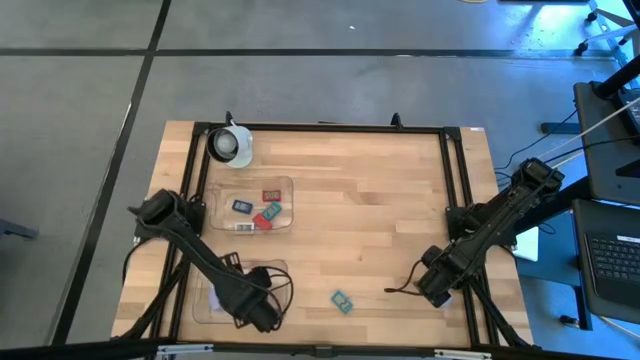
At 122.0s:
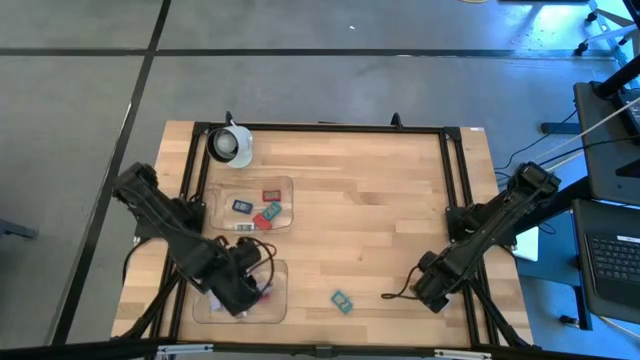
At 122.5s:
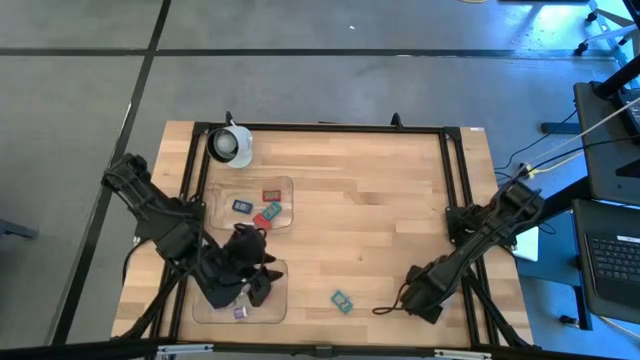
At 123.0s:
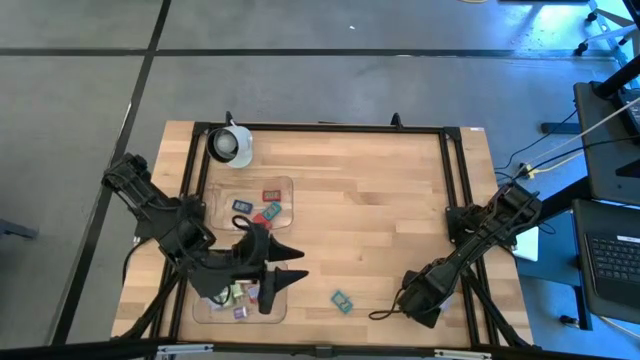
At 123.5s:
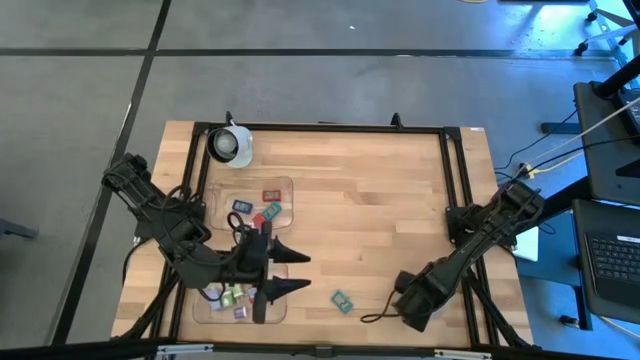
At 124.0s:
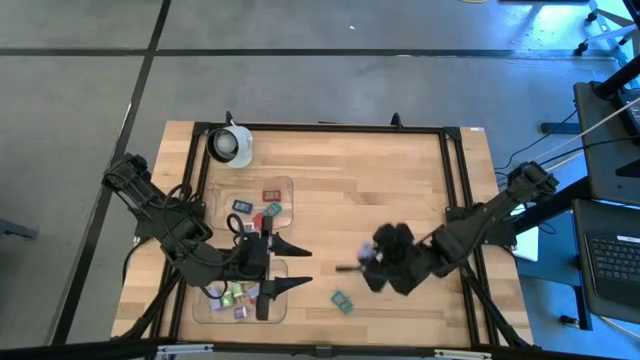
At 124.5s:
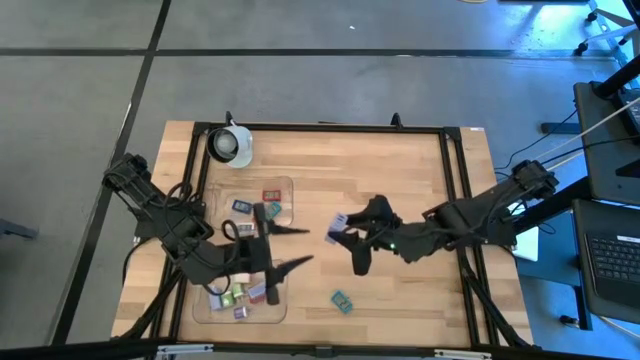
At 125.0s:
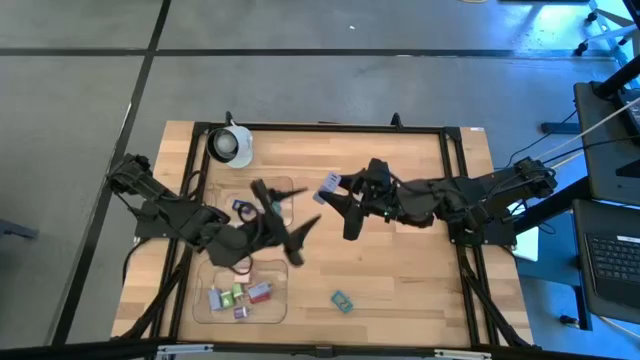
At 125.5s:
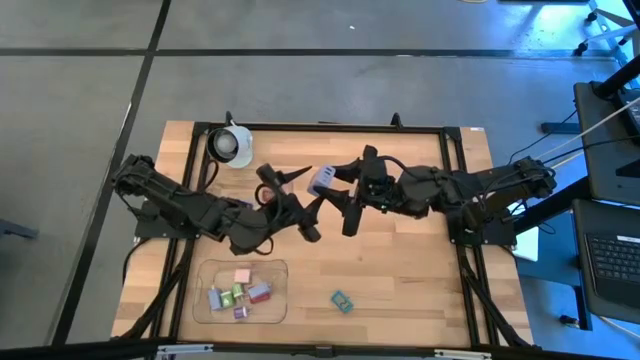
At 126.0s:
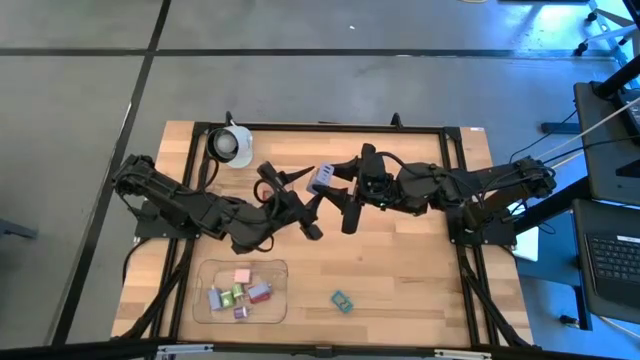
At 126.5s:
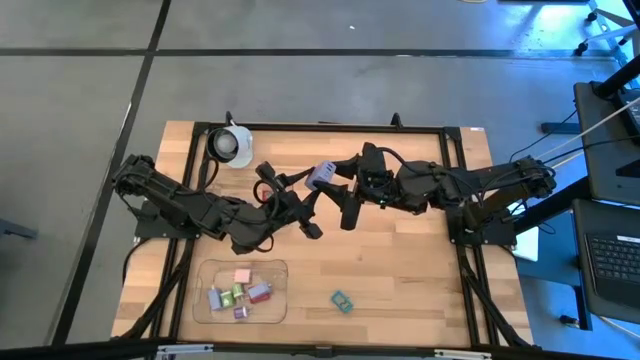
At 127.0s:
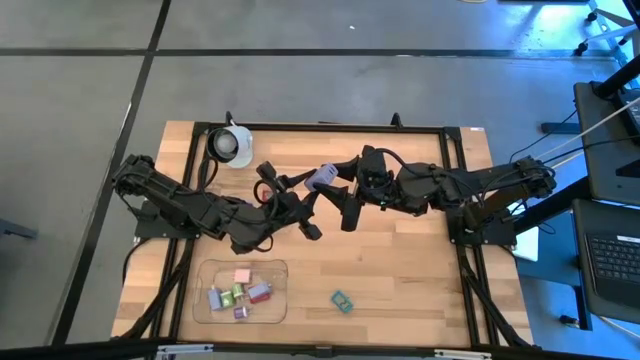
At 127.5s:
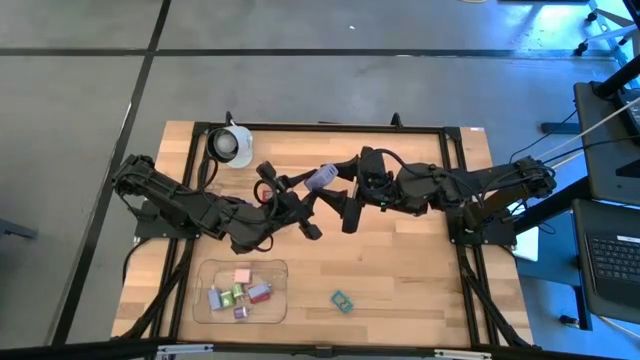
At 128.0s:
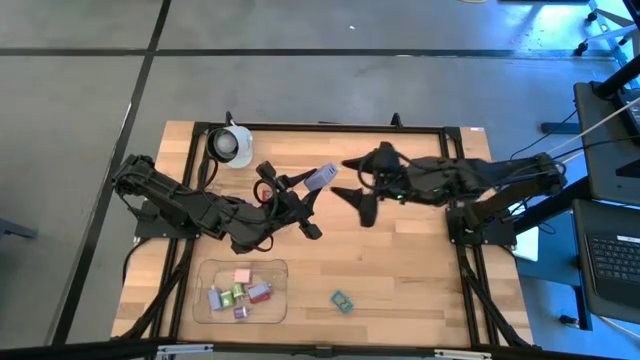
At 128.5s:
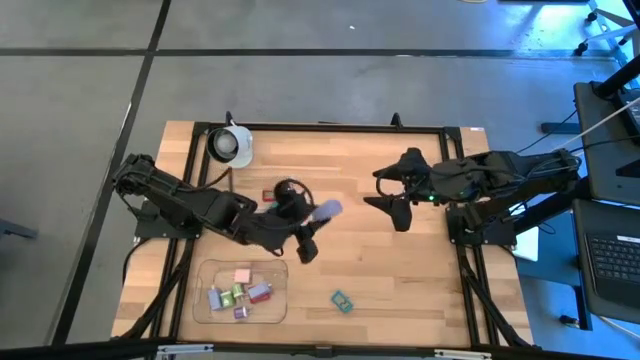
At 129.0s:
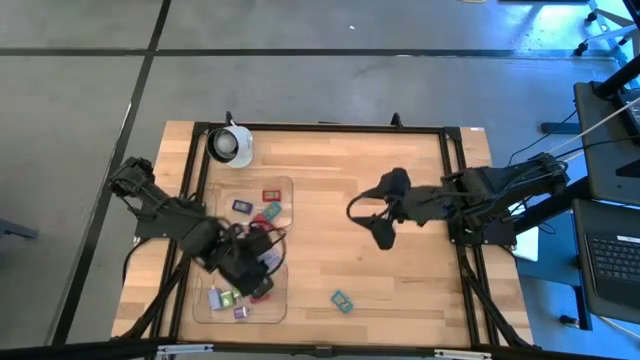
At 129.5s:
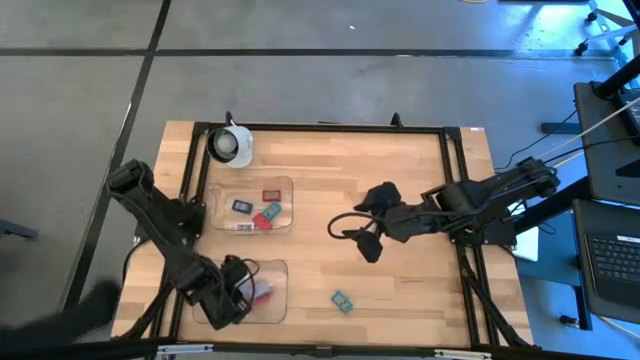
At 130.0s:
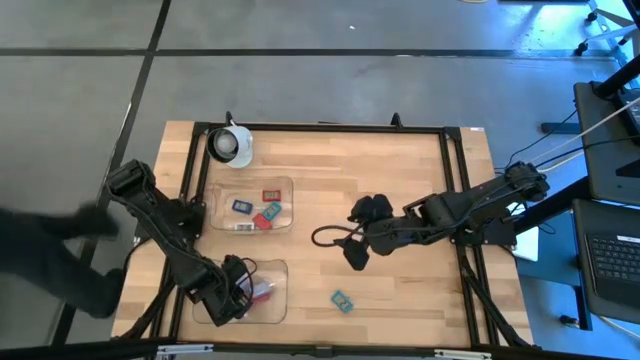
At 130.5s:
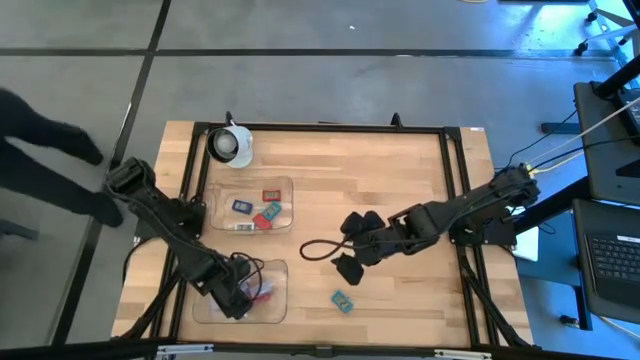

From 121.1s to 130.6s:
Task: Pick & Place Office items
Put the light blue charger adapter into the bottom transparent bin

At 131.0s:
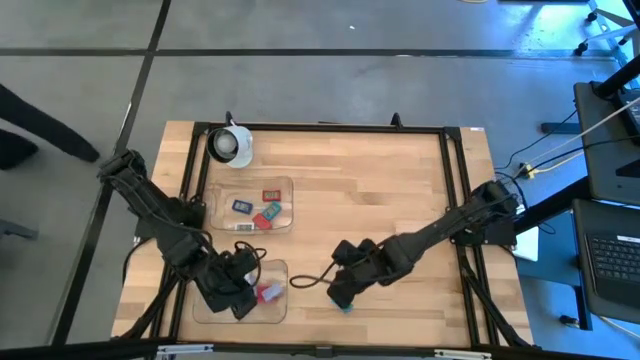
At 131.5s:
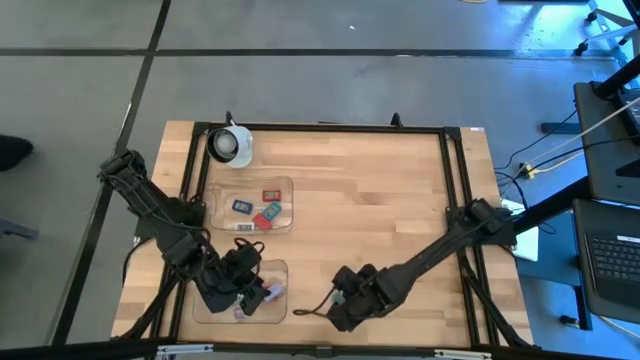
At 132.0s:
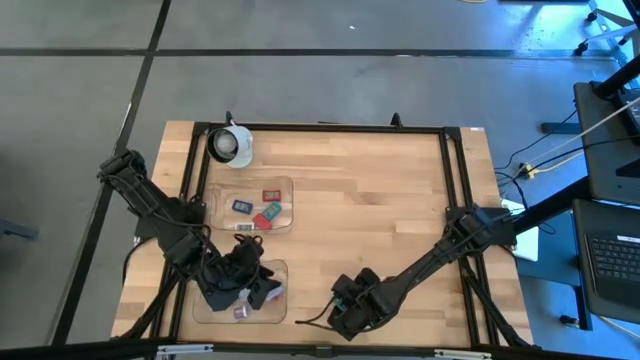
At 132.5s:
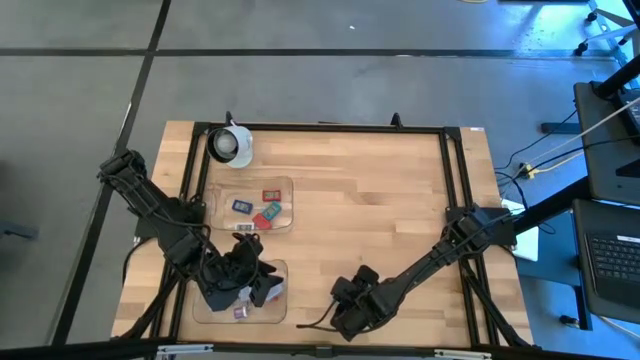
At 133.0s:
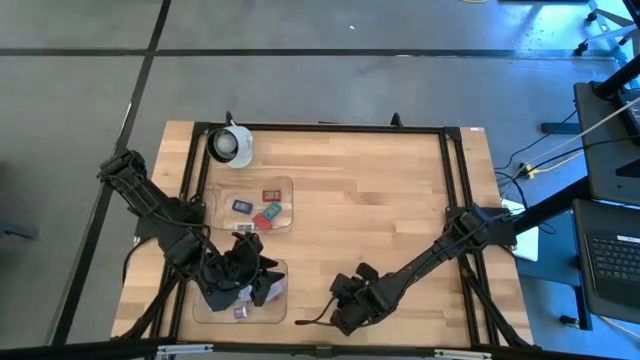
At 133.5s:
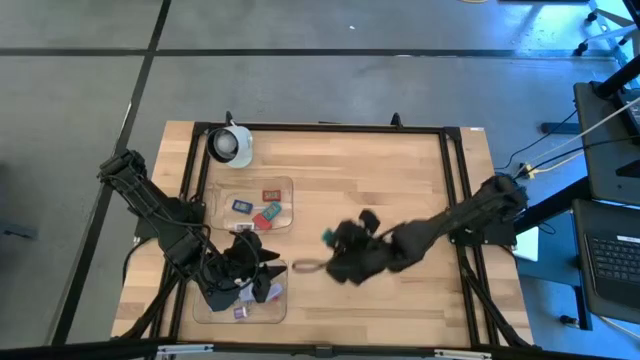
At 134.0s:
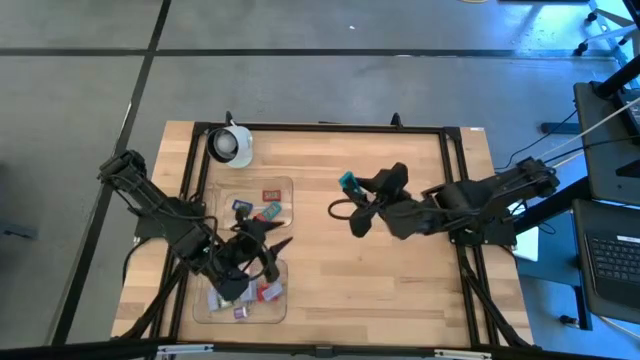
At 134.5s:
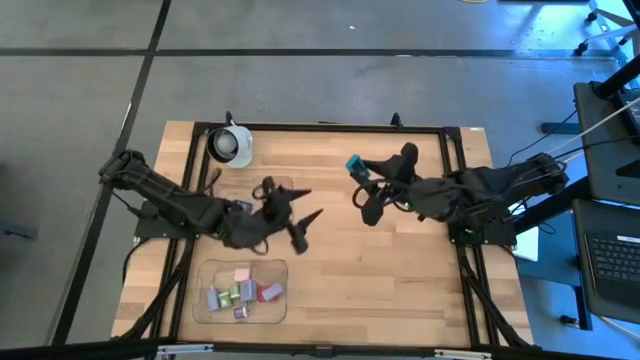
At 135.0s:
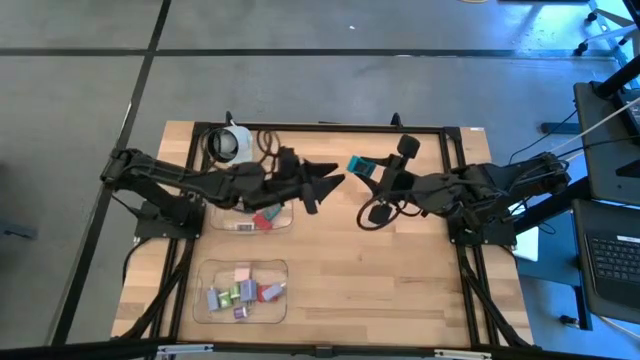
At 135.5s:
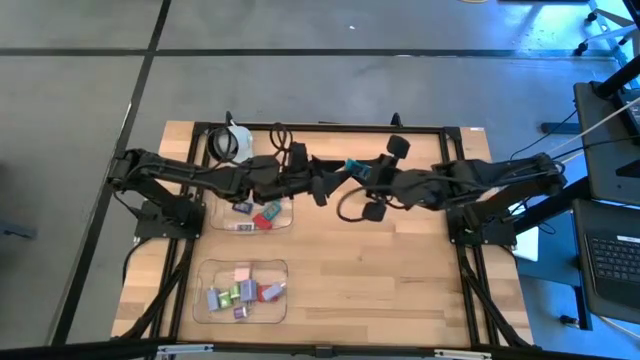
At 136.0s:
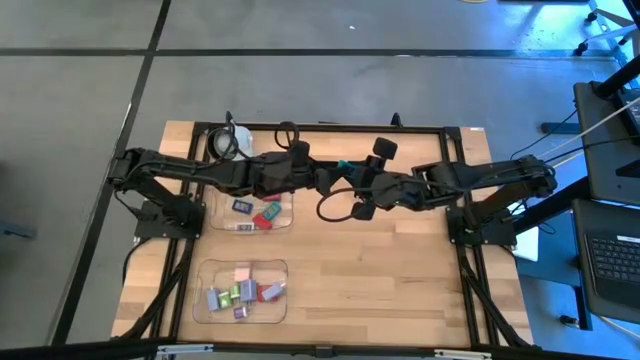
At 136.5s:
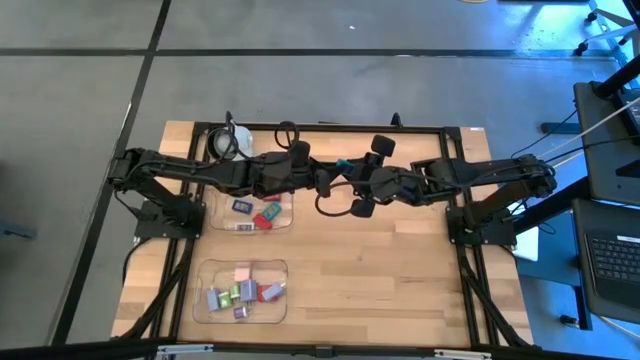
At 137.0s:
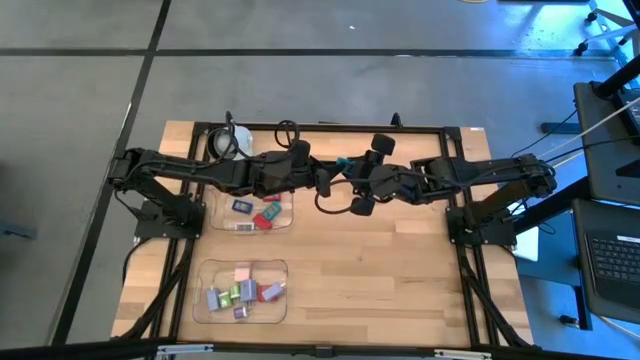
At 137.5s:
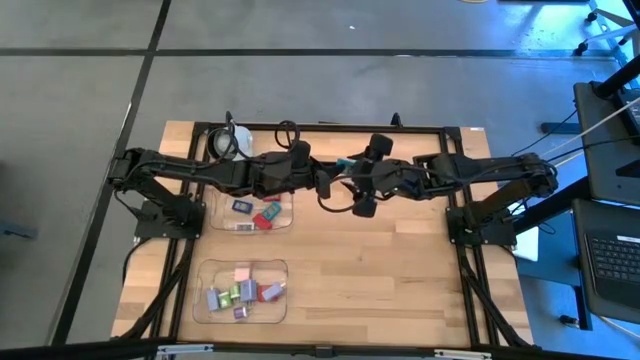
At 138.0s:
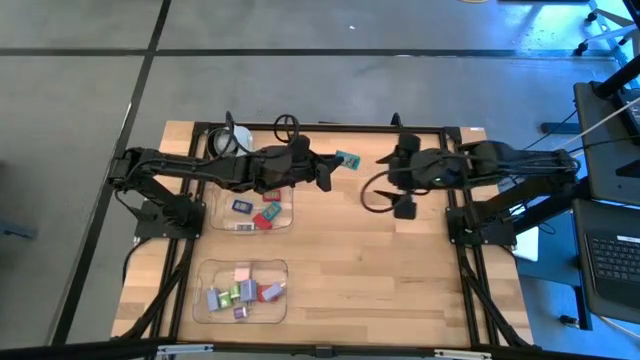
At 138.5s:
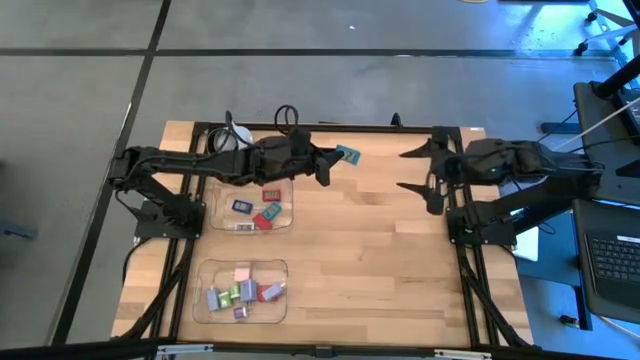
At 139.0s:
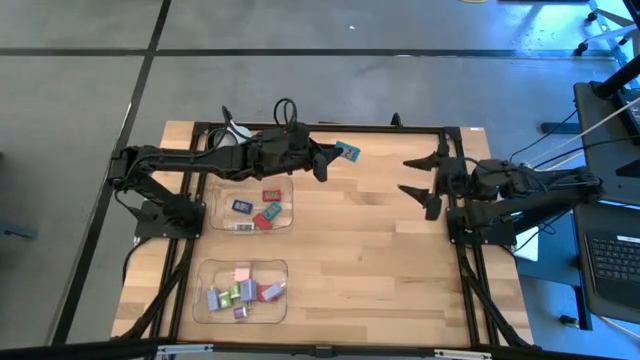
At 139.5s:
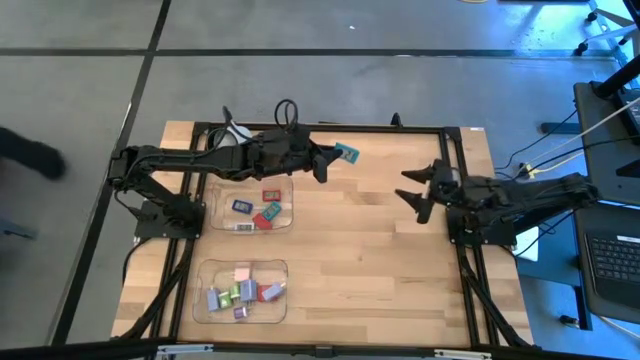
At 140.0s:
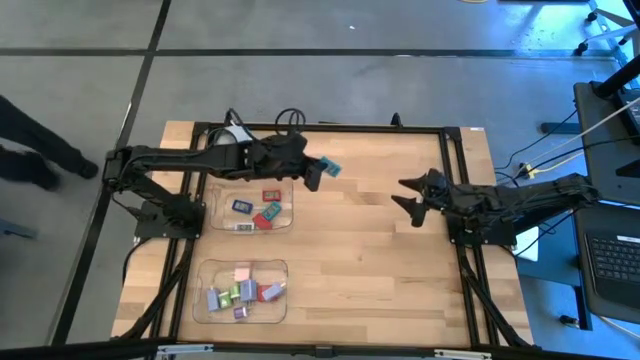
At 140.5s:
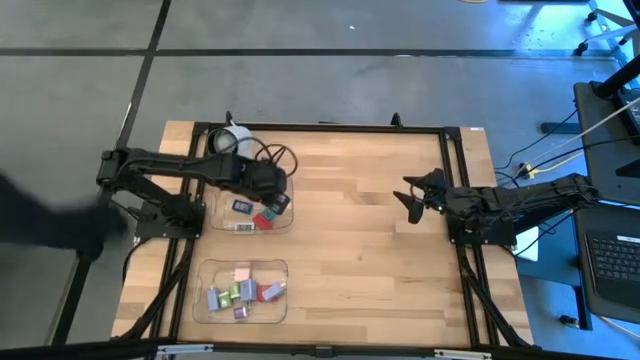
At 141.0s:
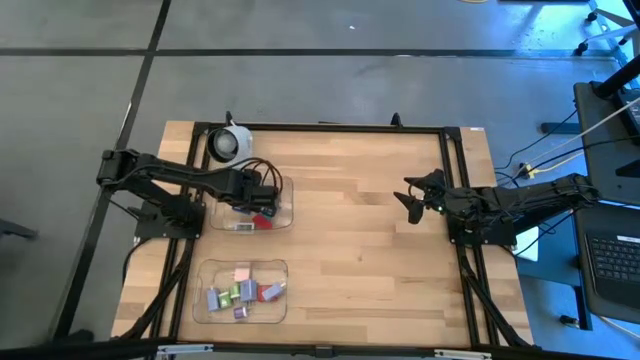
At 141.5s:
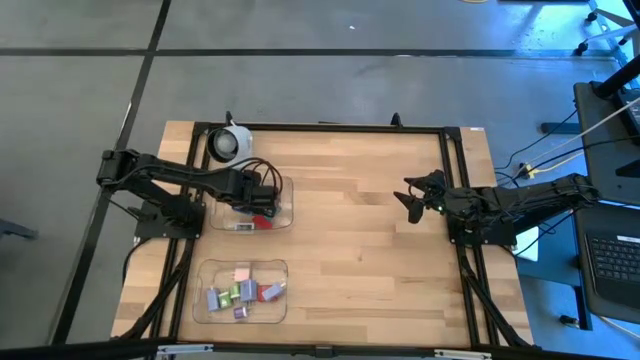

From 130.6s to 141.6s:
Put the light blue timer into the top transparent bin

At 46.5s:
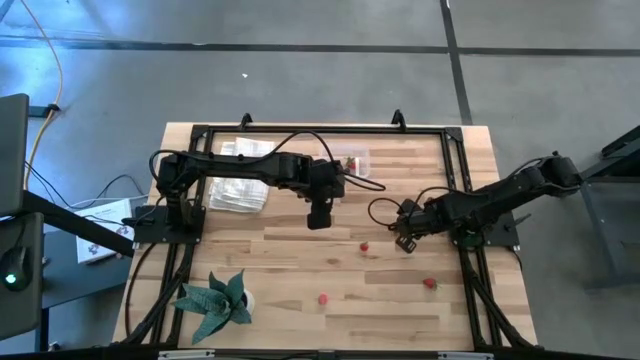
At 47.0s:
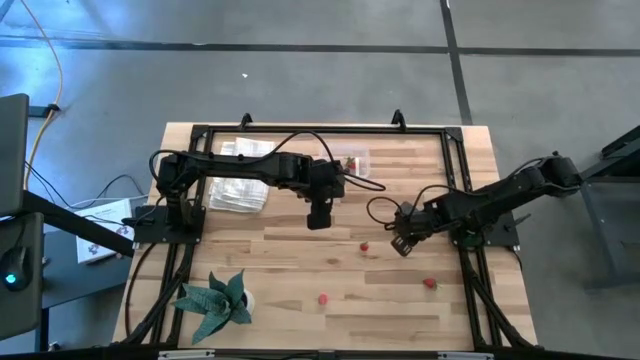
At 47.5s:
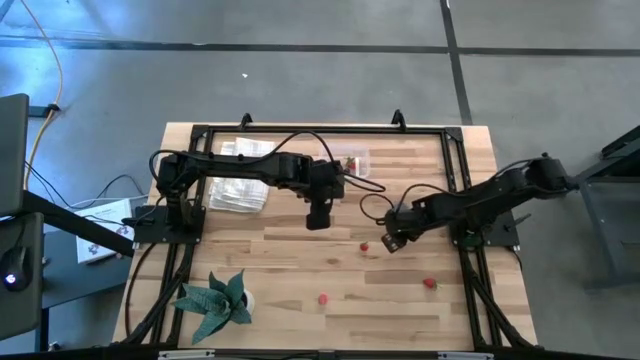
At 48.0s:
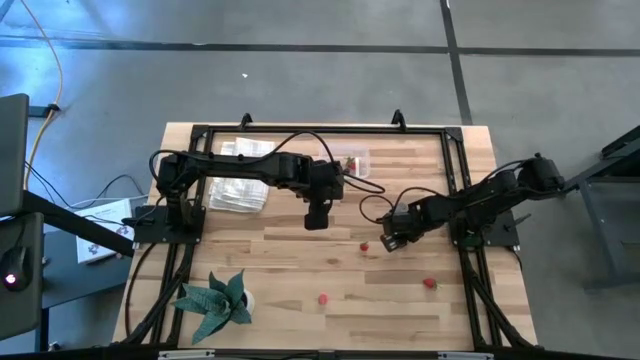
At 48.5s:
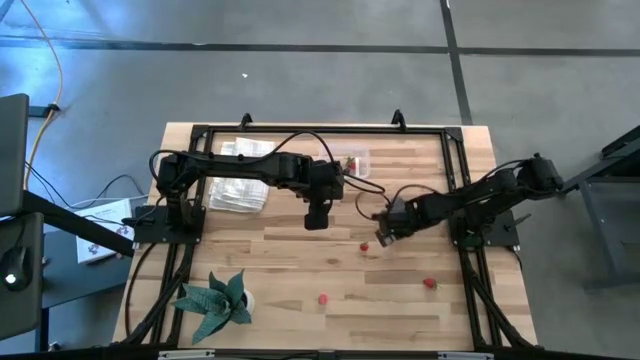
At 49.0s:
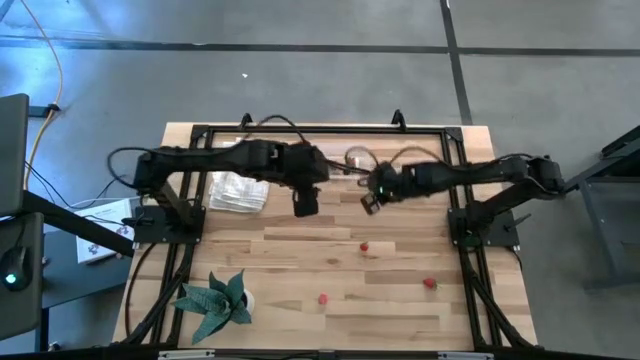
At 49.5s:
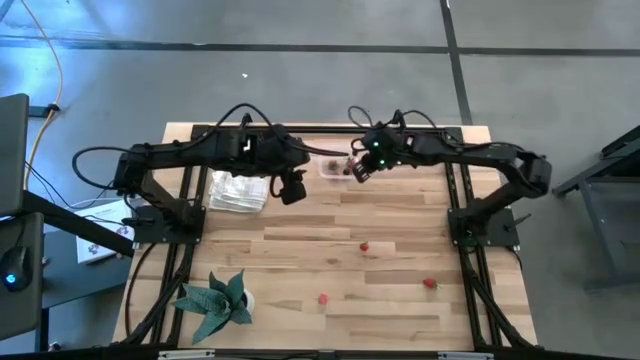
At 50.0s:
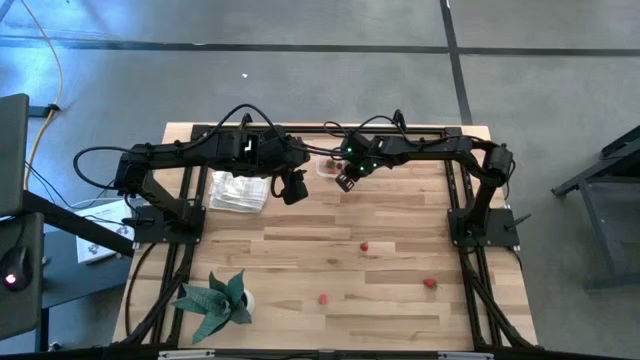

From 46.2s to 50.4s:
Task: Pick and placing Produce into tupperware
Put the red cherry into the transparent container
